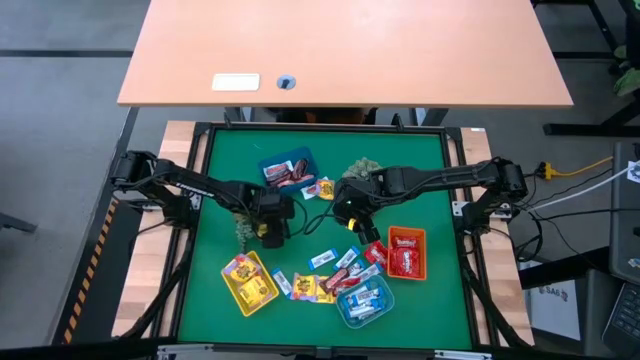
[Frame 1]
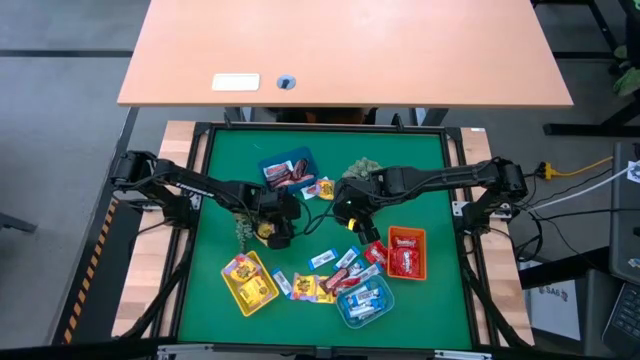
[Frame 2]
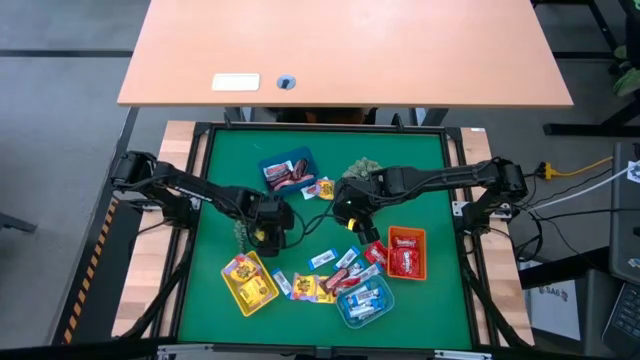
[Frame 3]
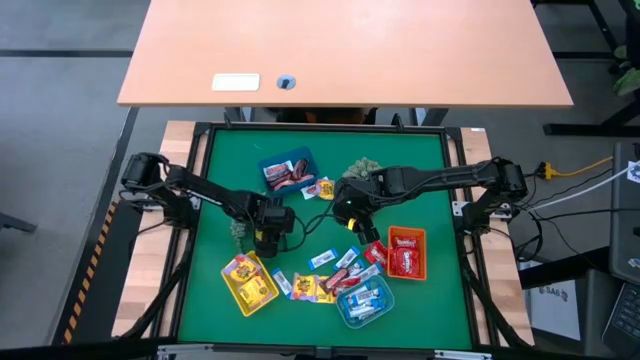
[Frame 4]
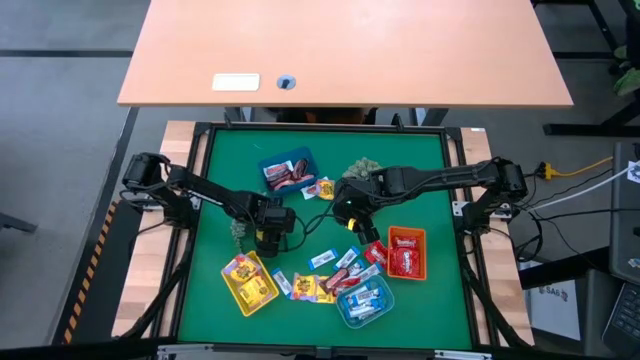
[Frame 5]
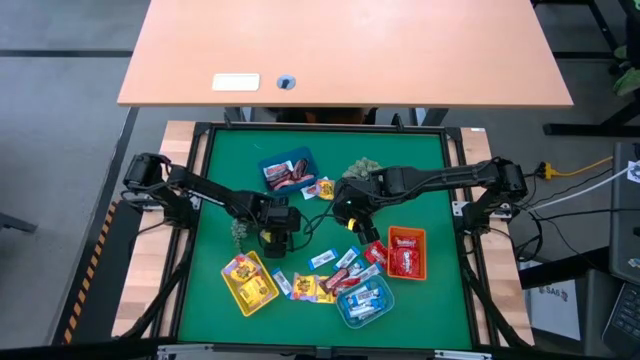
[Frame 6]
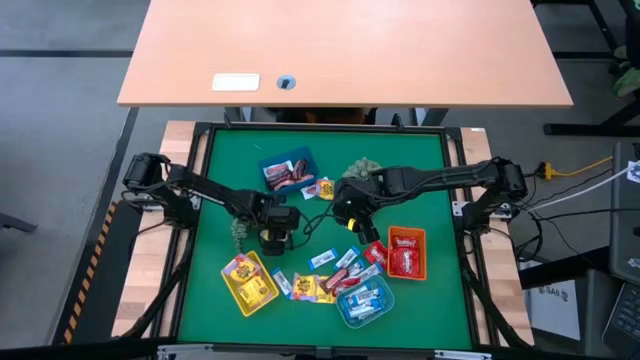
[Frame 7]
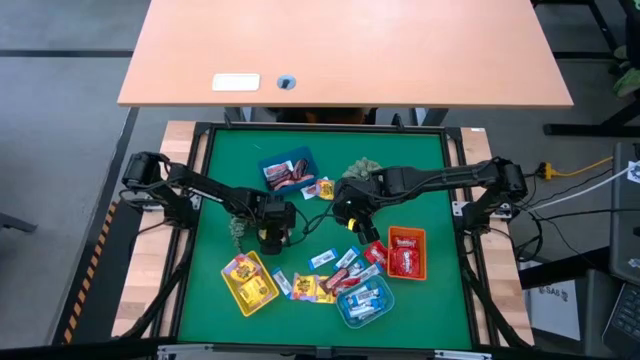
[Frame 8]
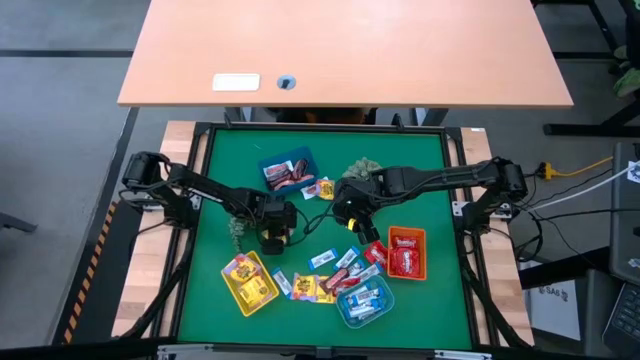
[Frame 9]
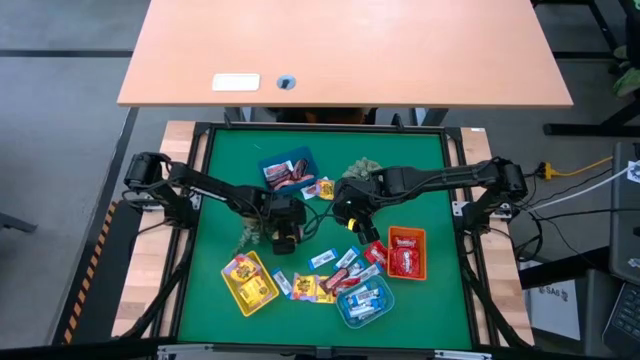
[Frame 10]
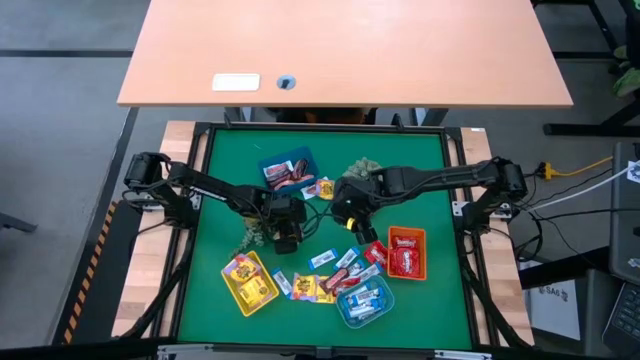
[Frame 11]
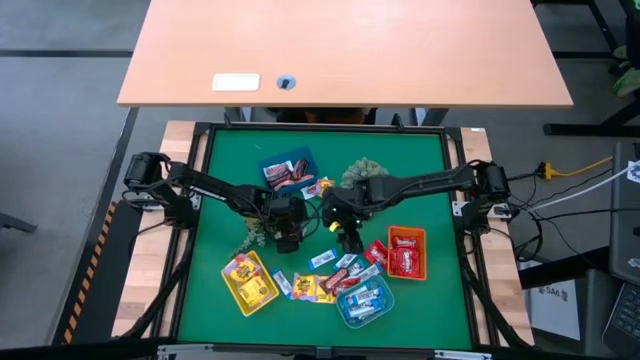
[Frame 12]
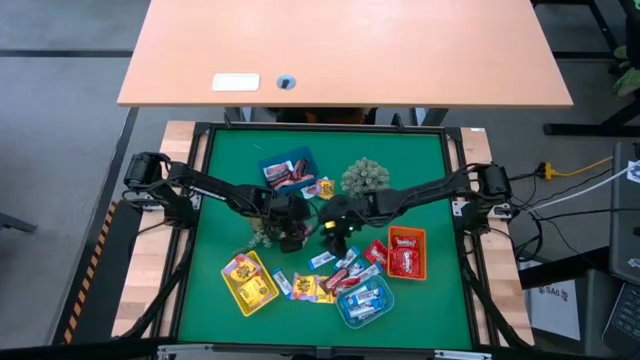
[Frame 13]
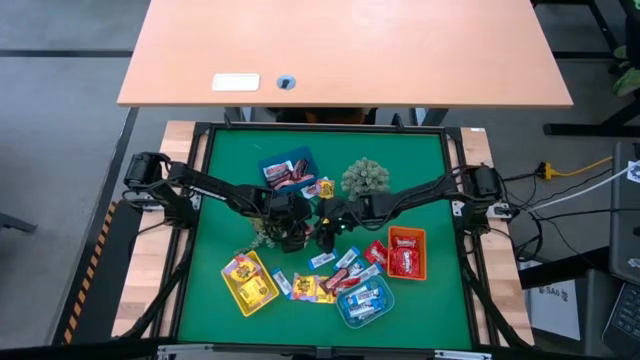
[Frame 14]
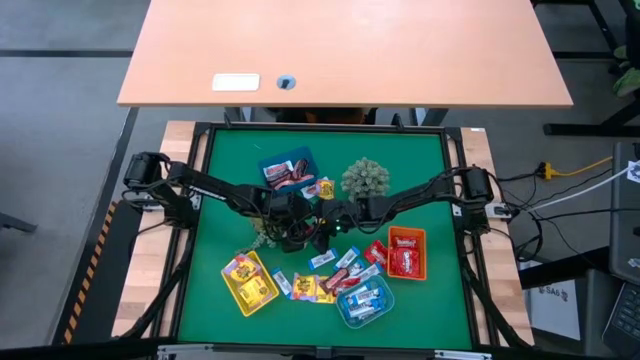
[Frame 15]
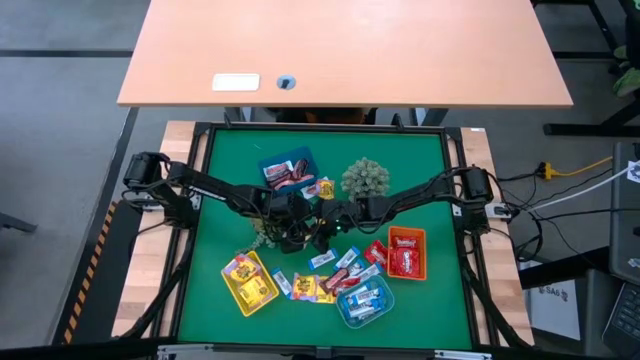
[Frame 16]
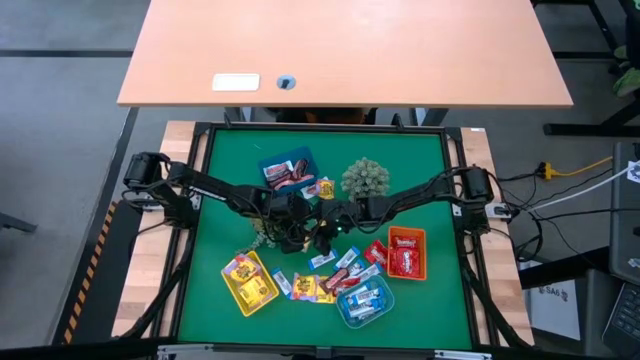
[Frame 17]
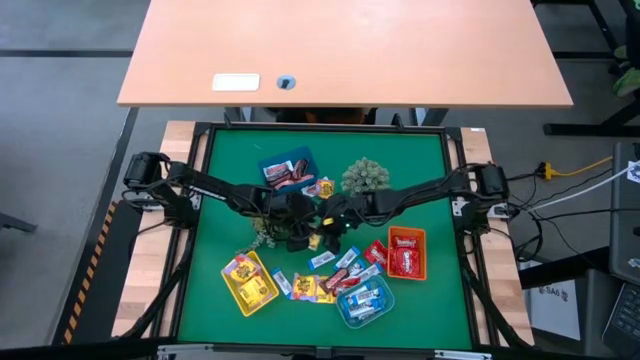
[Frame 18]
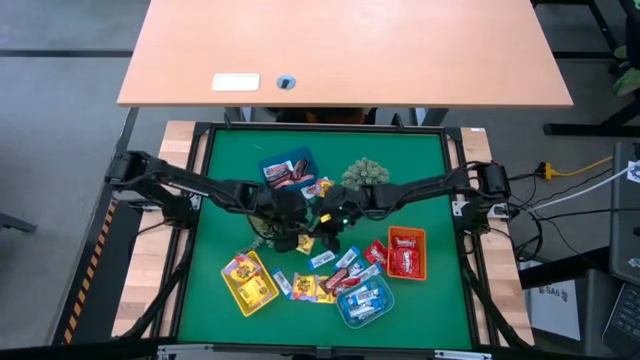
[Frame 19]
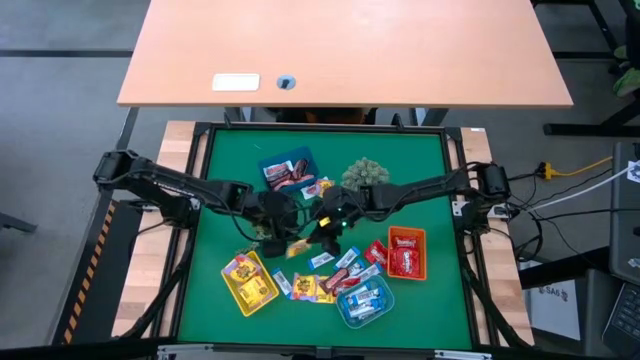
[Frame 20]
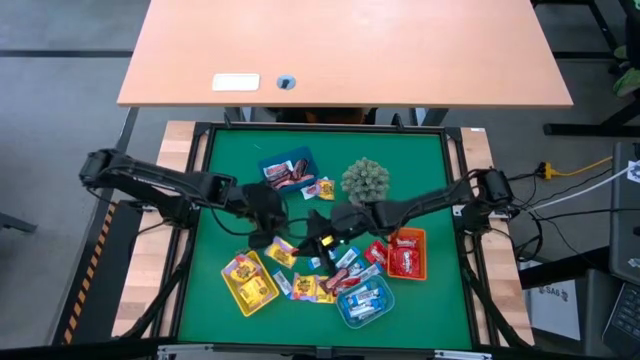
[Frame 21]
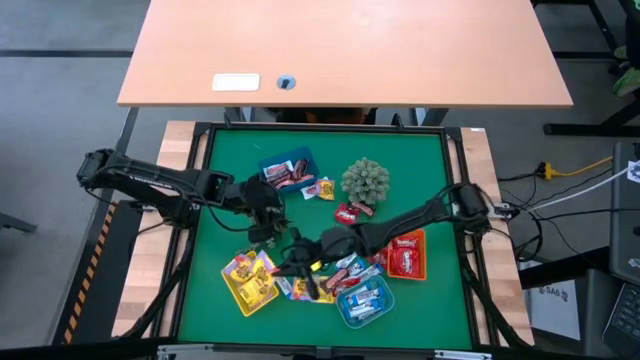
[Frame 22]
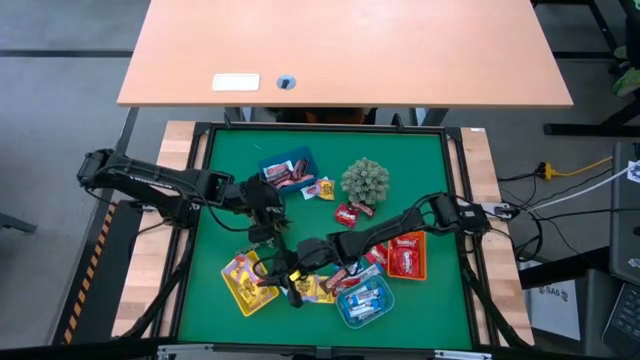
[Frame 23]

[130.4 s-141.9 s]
Task: Sort candy
Put the yellow candy into the yellow bin

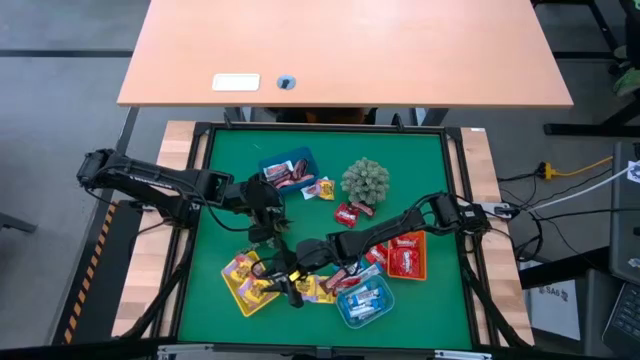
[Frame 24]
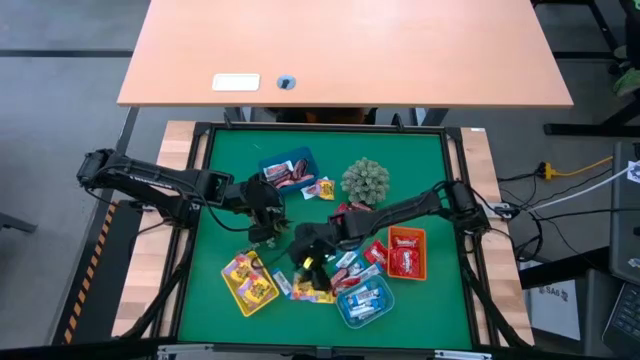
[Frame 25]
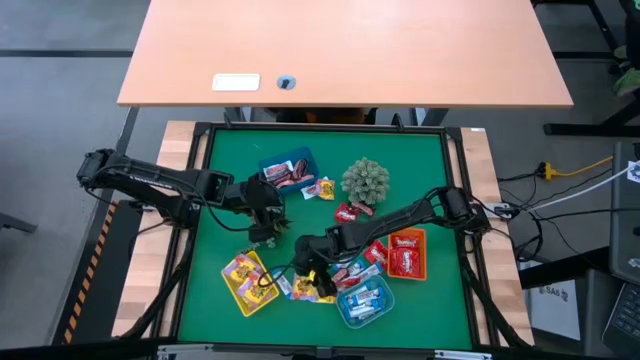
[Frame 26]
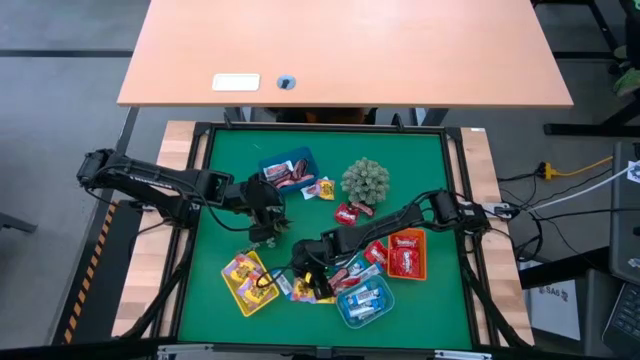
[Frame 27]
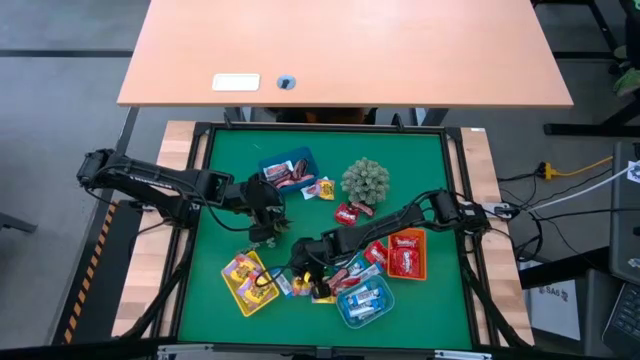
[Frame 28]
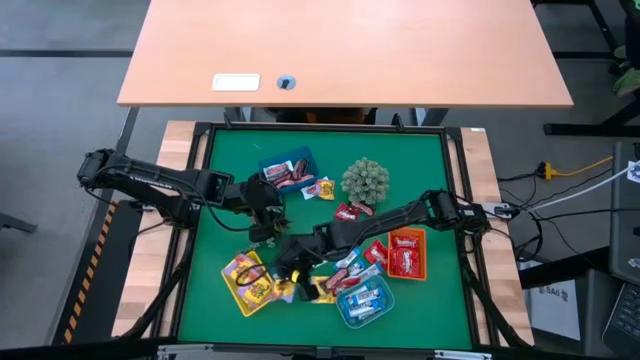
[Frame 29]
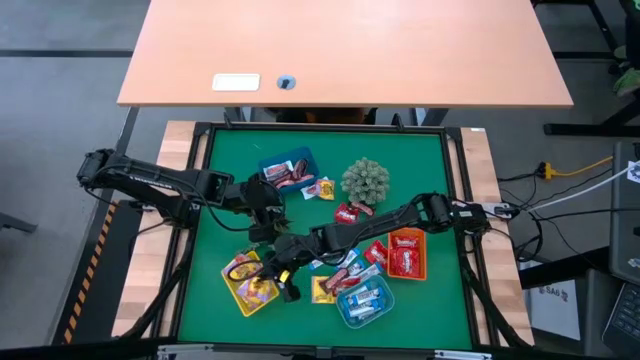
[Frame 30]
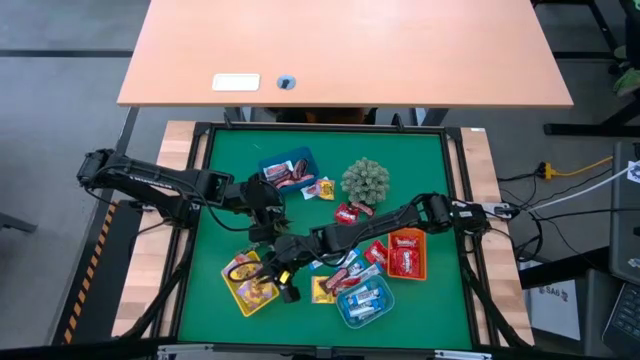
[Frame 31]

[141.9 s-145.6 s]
Put the yellow candy into the yellow bin

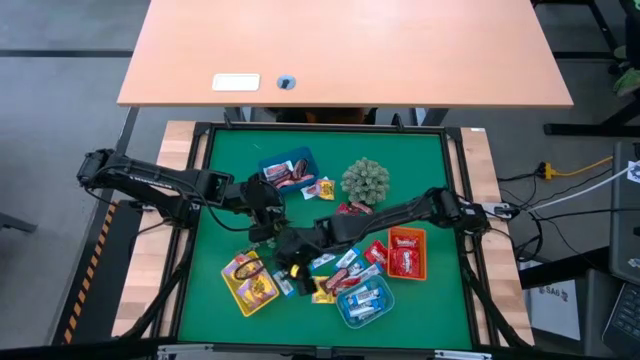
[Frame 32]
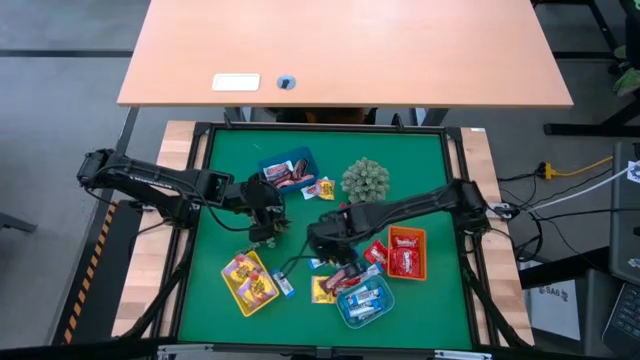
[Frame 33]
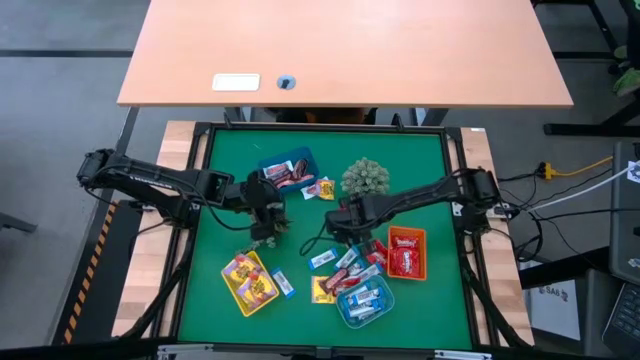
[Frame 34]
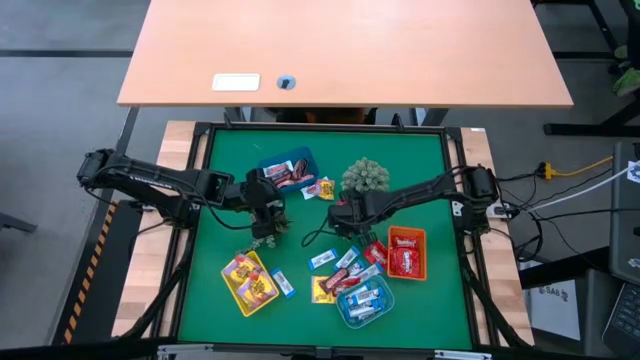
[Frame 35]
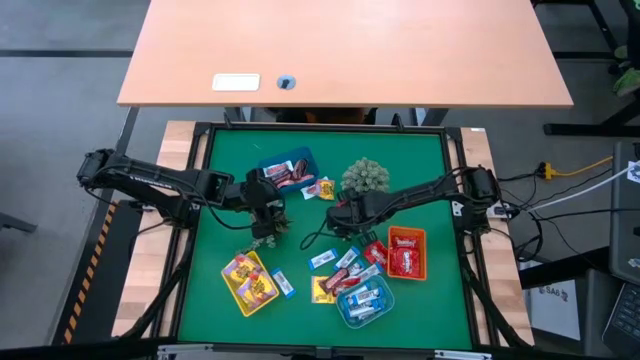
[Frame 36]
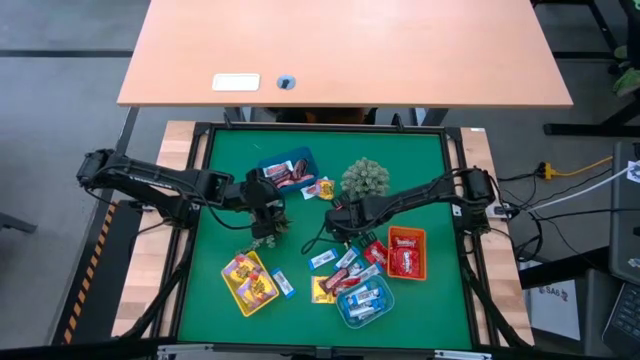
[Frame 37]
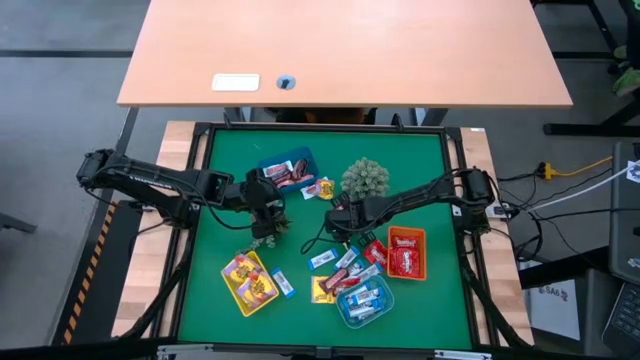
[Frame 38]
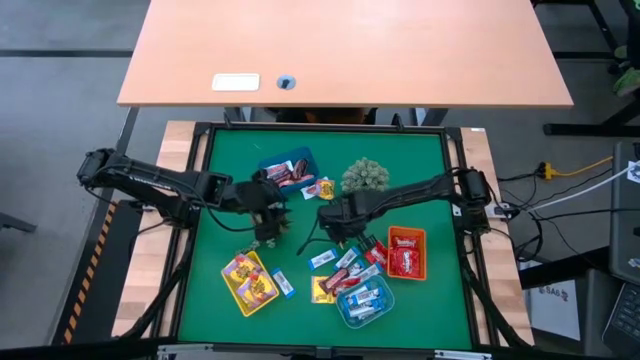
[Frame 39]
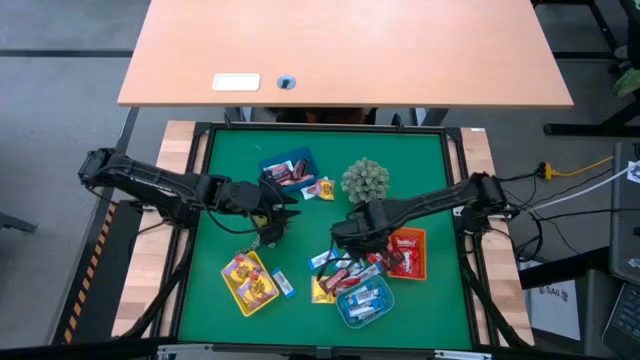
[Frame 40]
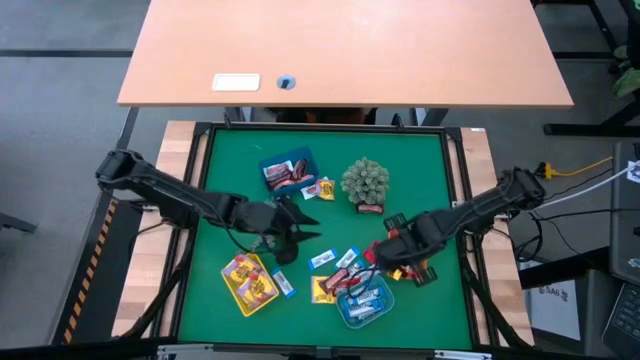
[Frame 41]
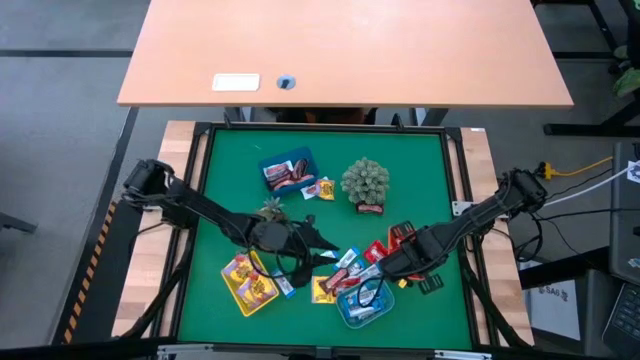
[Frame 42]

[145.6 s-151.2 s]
Put the red candy into the orange bin
